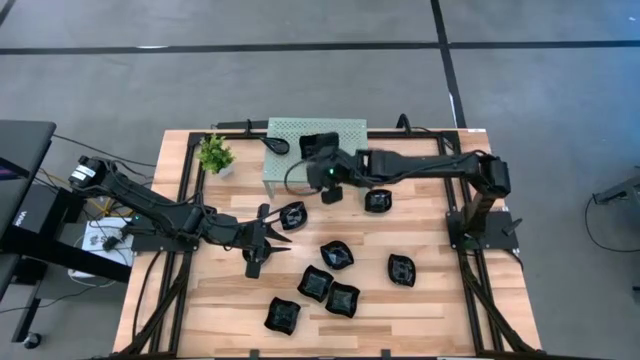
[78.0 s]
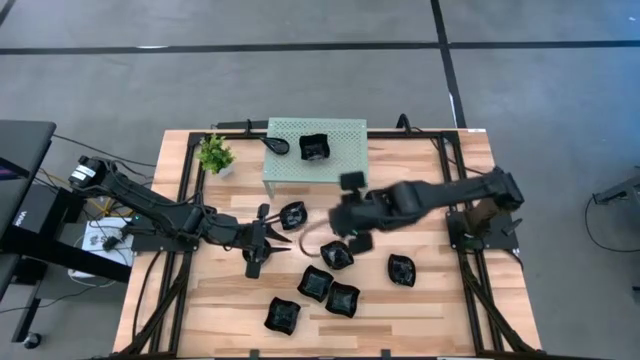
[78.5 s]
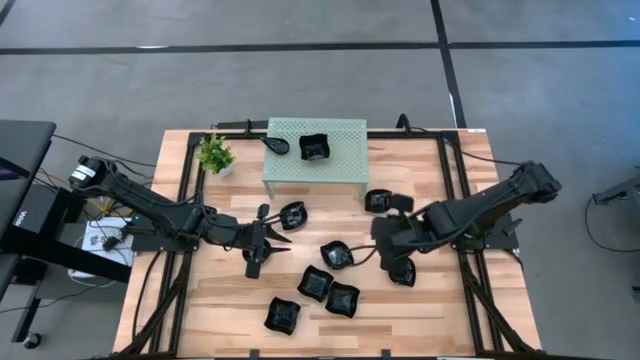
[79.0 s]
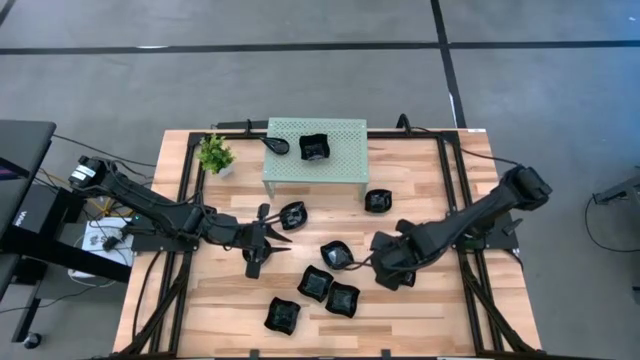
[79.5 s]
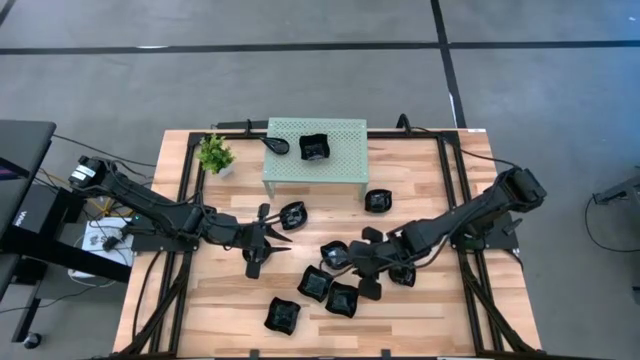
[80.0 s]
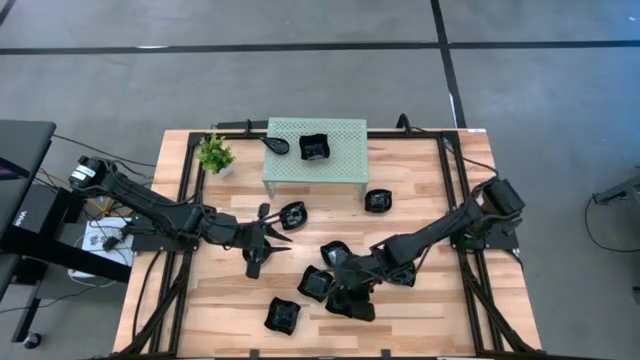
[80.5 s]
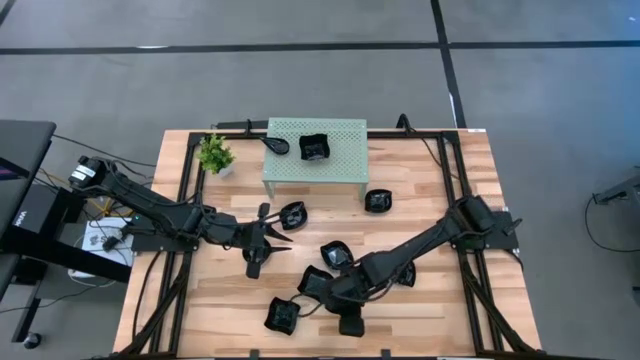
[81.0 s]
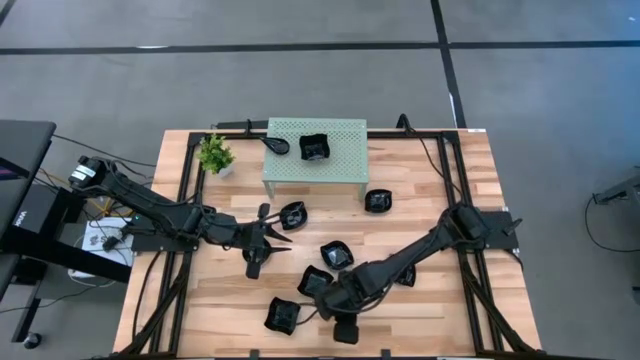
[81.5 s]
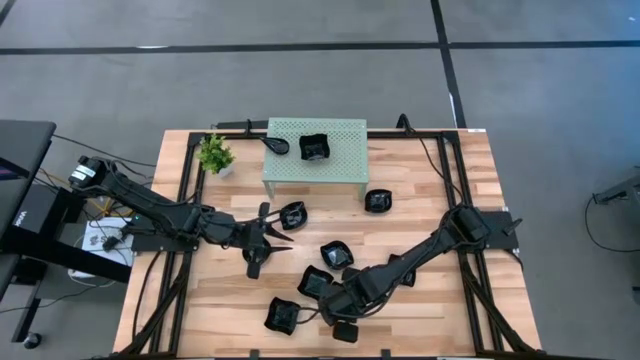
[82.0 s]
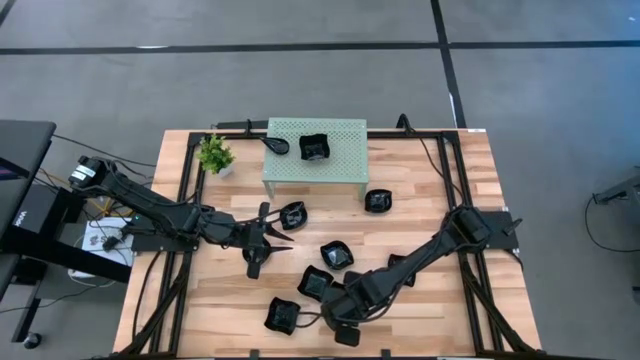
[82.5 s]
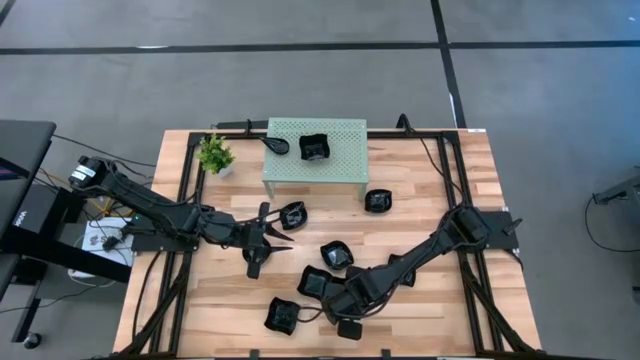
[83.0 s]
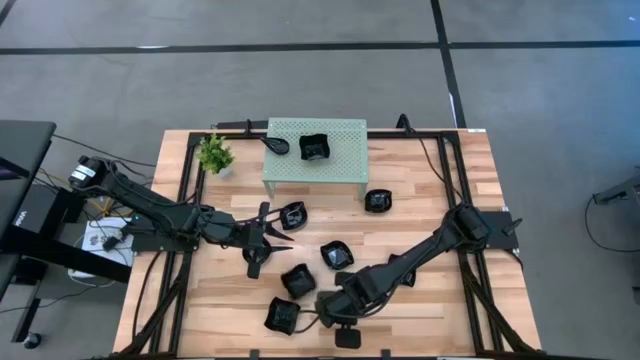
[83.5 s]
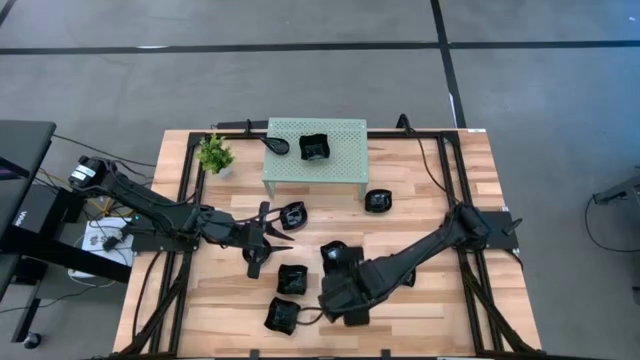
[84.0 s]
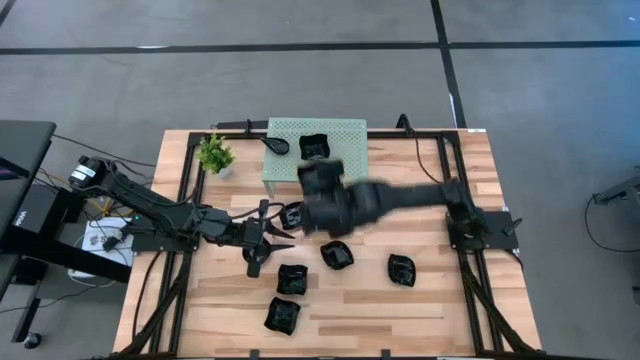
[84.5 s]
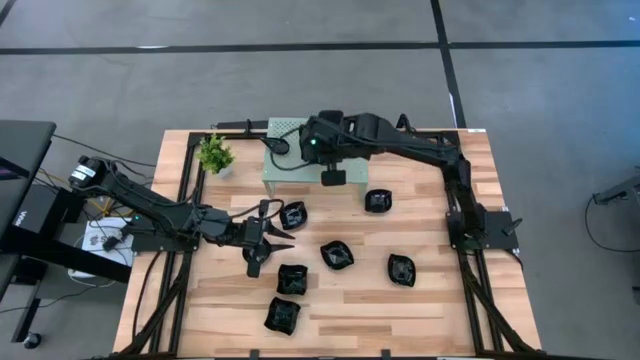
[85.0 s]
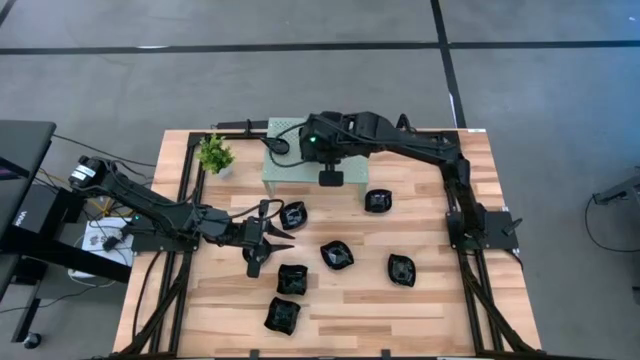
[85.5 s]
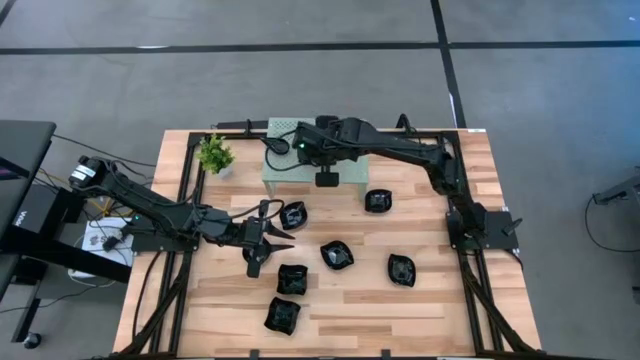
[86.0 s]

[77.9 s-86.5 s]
Task: Pick & Place Mini shaped plates
Stack the distorted square plate on top of the other distorted square plate on the shelf

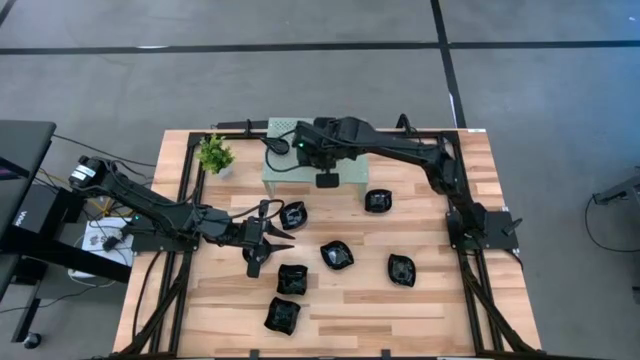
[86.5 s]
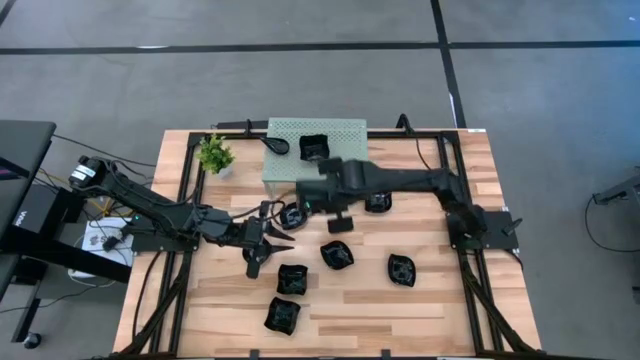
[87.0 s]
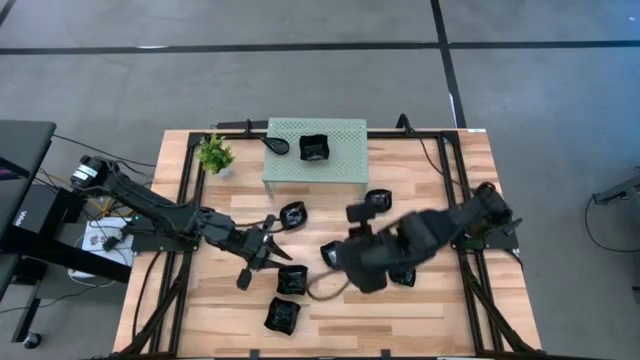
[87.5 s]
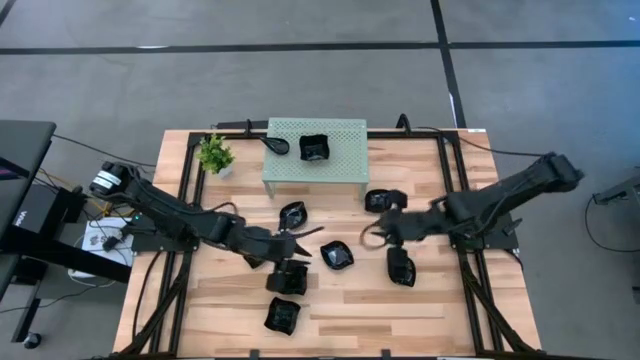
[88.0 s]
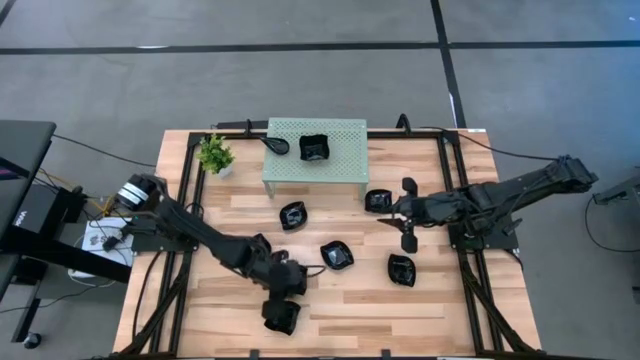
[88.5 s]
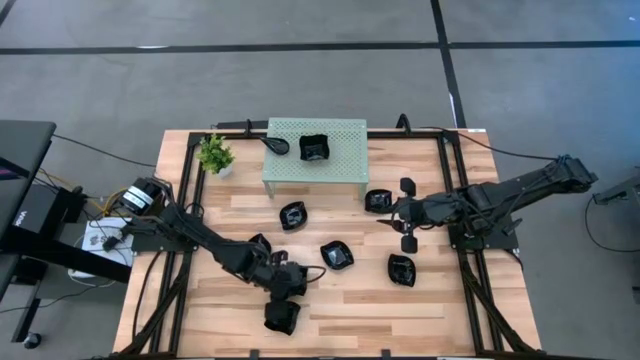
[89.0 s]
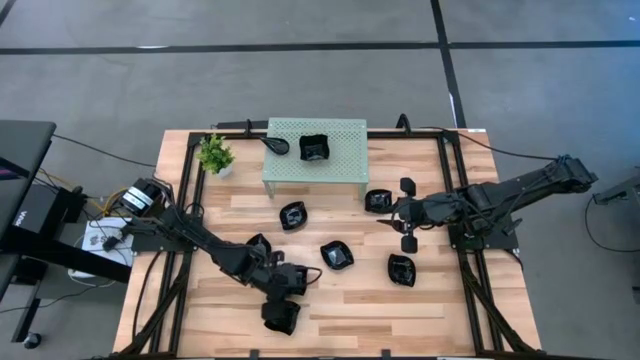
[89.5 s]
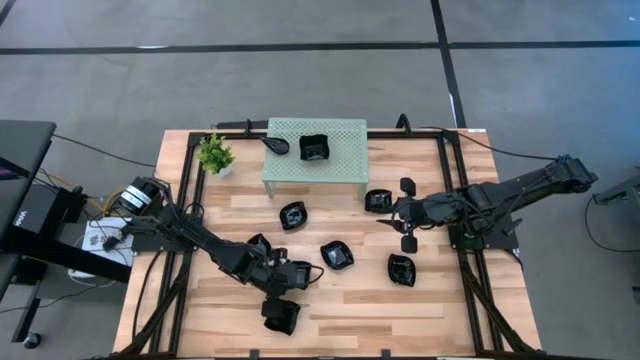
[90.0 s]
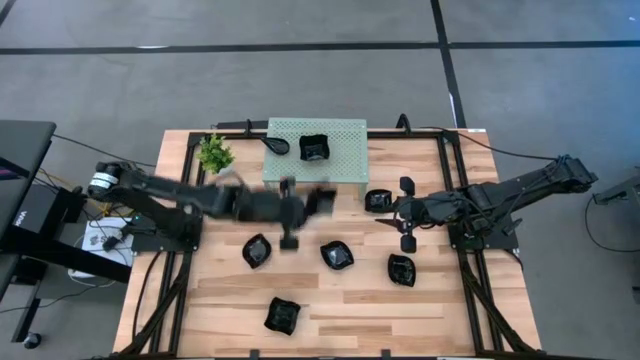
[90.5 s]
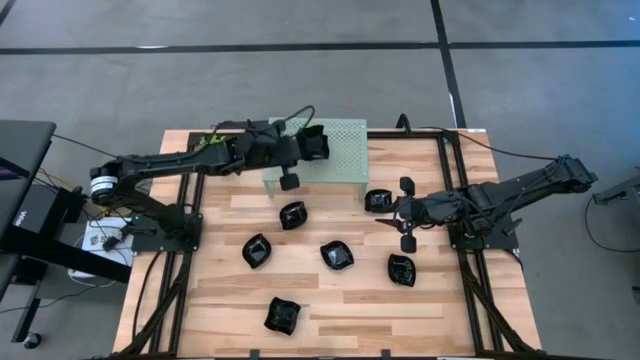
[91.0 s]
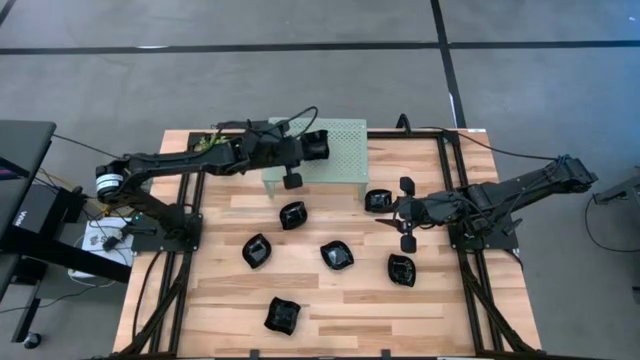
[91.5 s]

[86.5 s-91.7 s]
Stack the distorted square plate on top of the other distorted square plate on the shelf

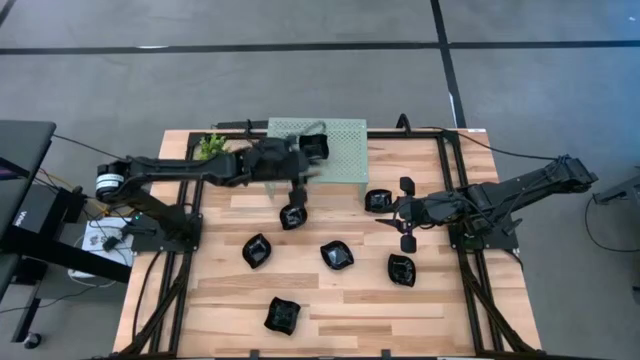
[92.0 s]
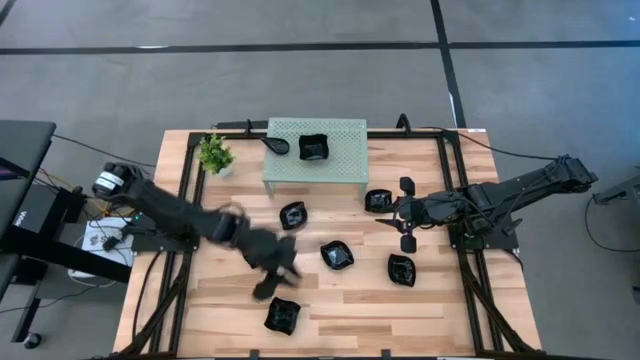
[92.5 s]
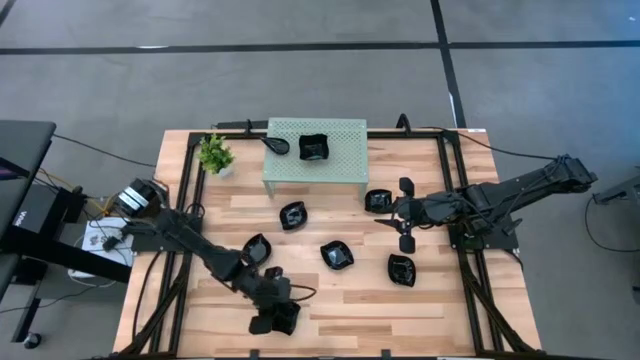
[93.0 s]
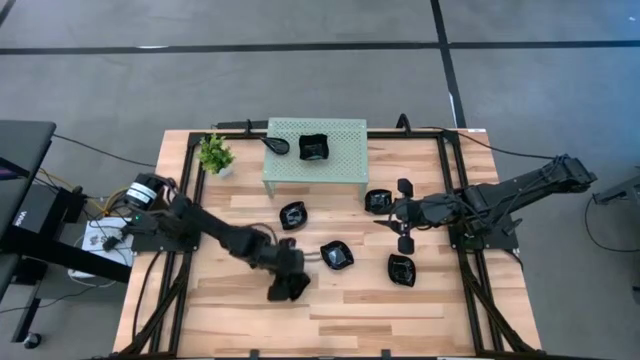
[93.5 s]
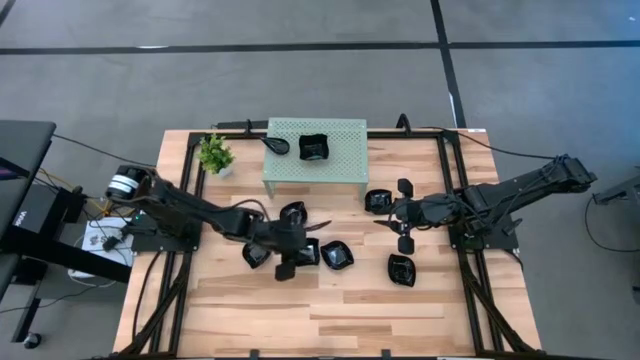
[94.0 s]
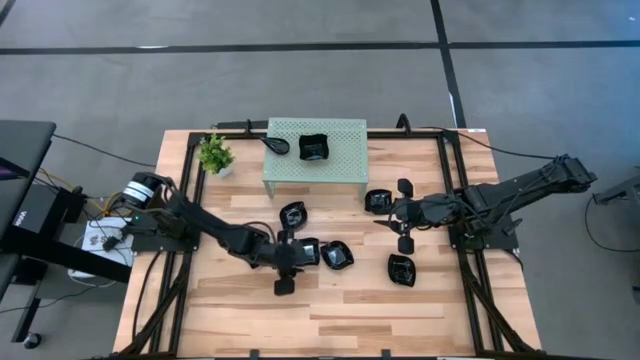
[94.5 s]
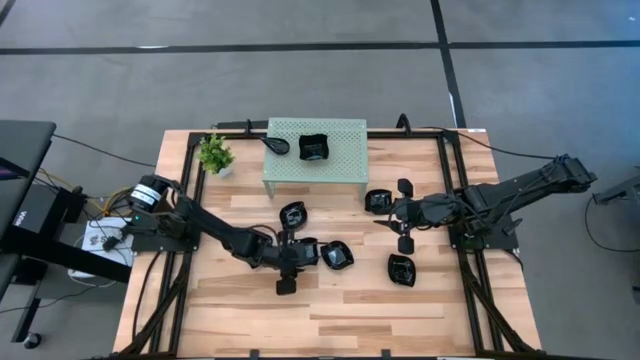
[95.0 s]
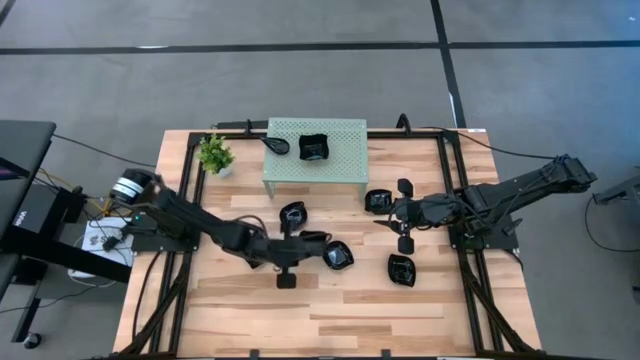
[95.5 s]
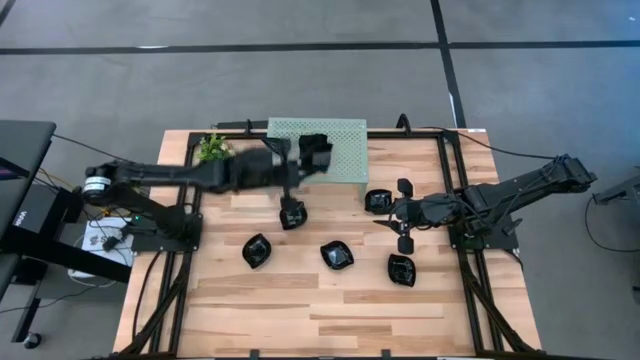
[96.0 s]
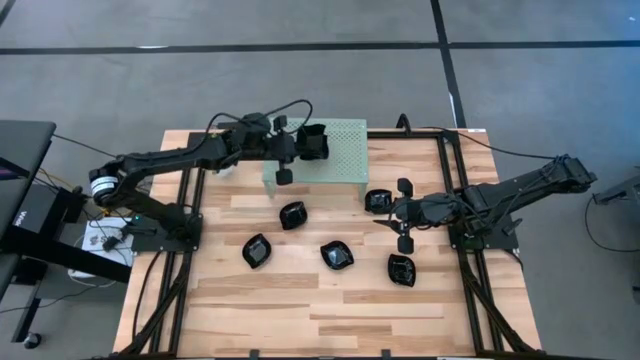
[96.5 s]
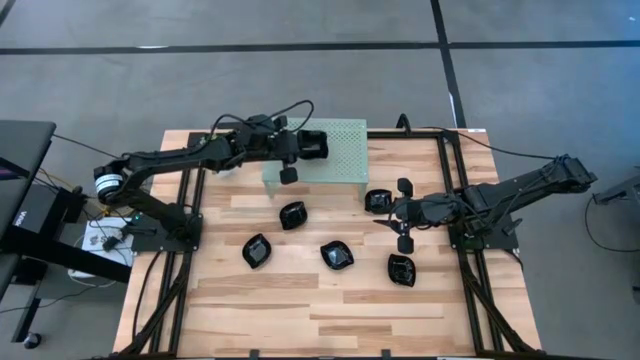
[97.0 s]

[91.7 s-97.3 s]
Stack the distorted square plate on top of the other distorted square plate on the shelf

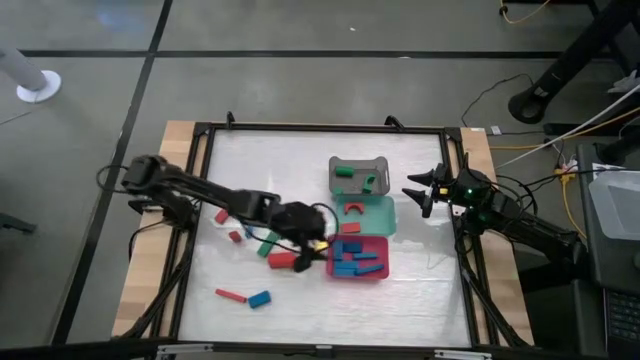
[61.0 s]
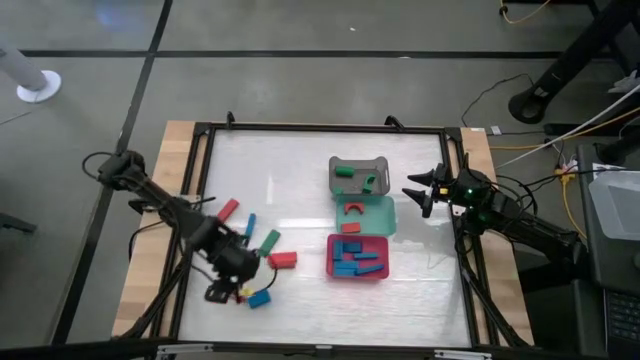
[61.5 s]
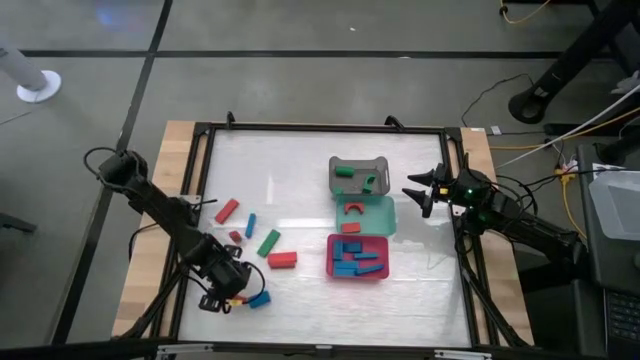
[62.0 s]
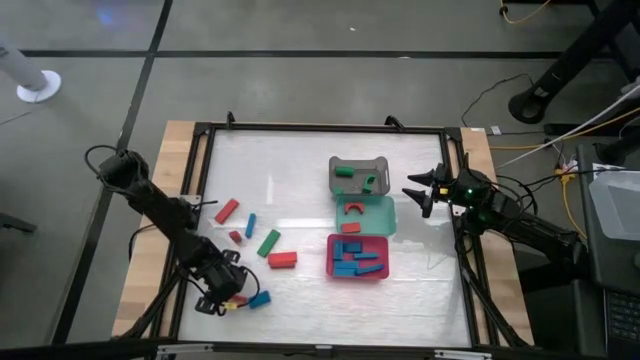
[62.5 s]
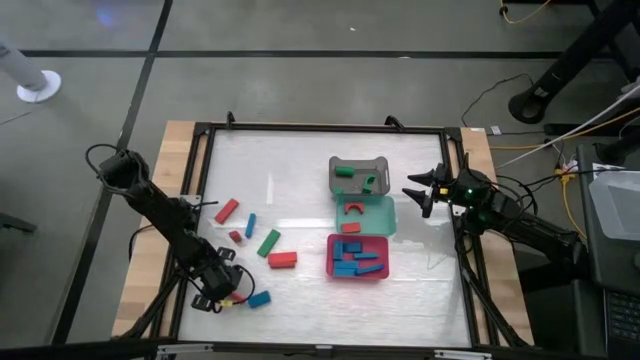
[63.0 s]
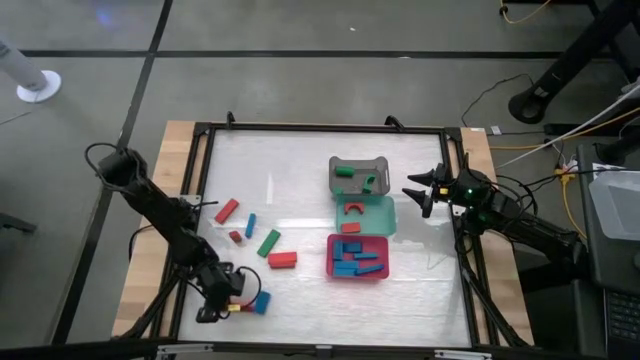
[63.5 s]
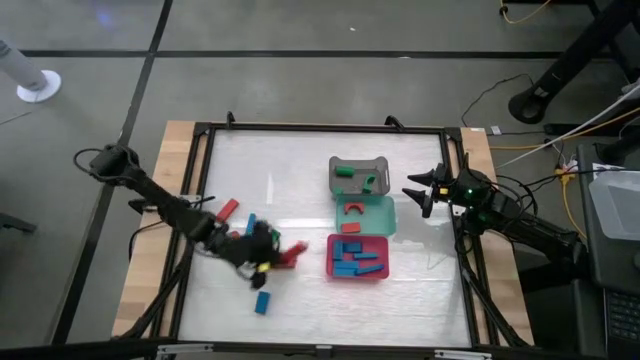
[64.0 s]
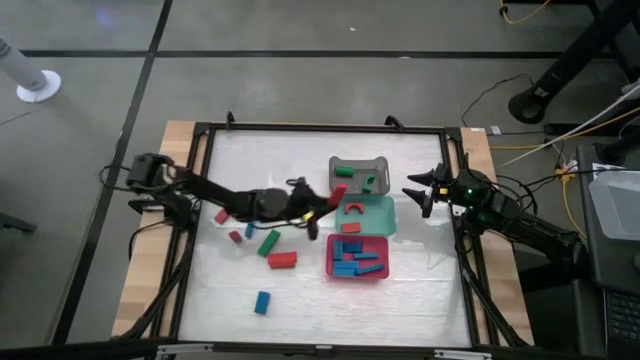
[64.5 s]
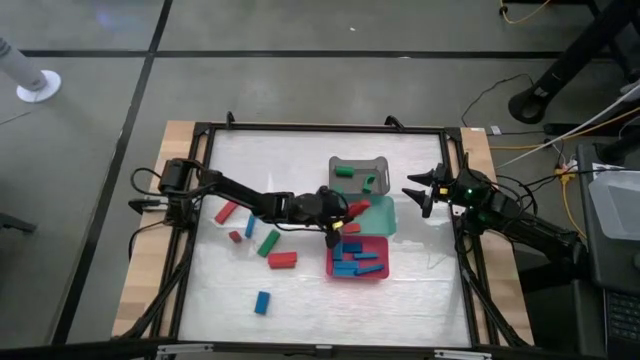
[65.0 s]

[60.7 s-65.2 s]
Task: Sort blocks
Put the red block into the green bin
